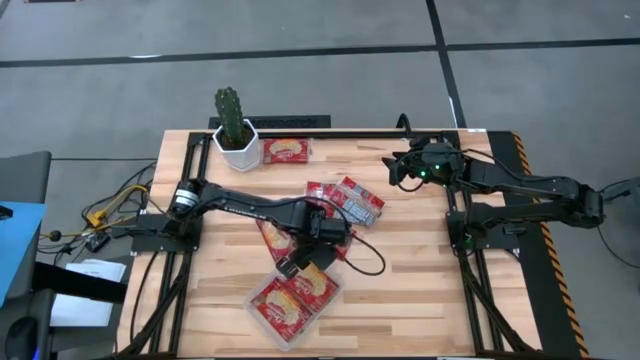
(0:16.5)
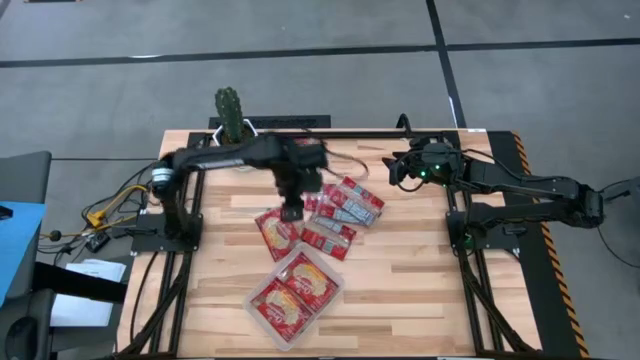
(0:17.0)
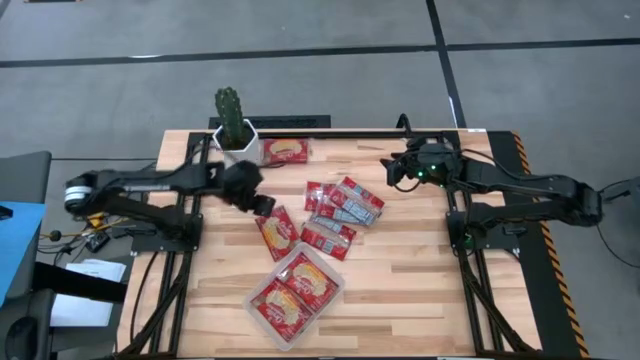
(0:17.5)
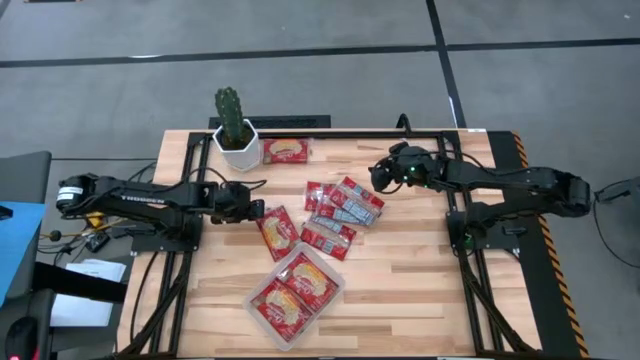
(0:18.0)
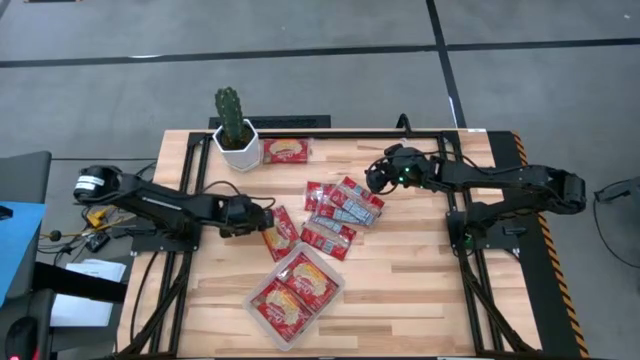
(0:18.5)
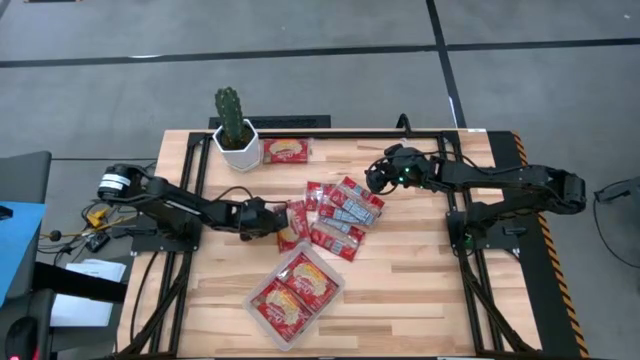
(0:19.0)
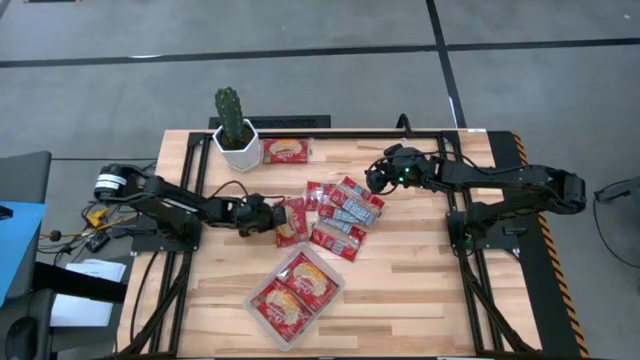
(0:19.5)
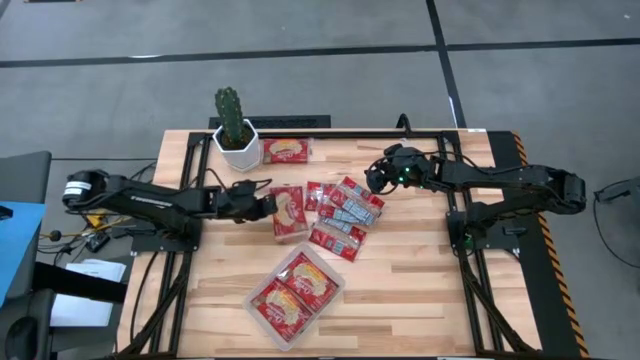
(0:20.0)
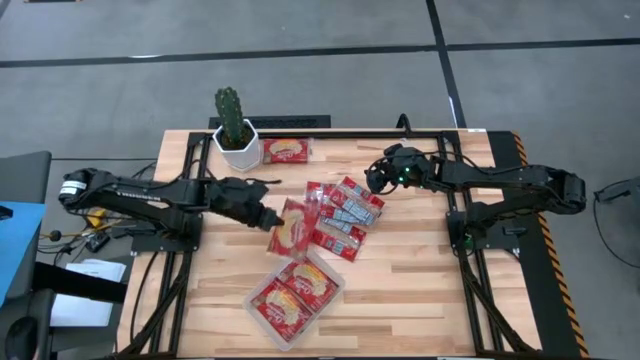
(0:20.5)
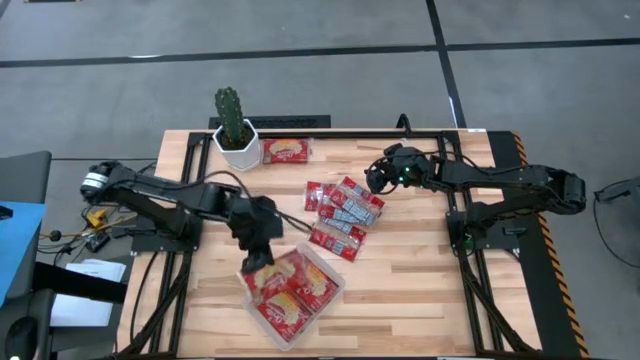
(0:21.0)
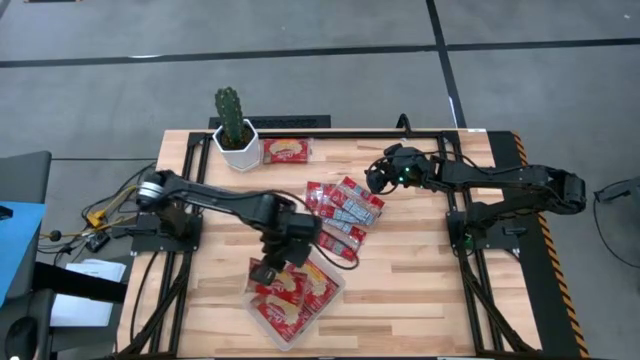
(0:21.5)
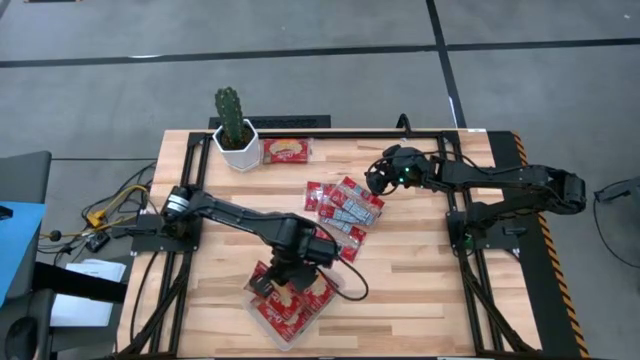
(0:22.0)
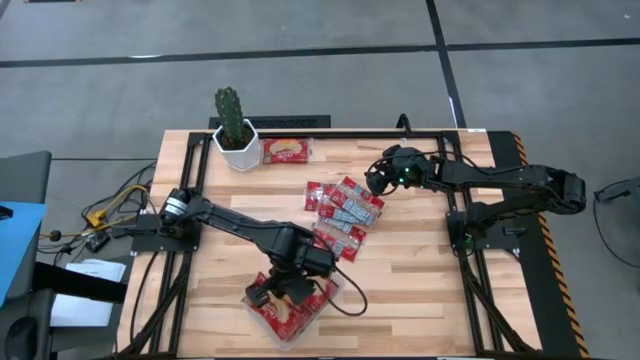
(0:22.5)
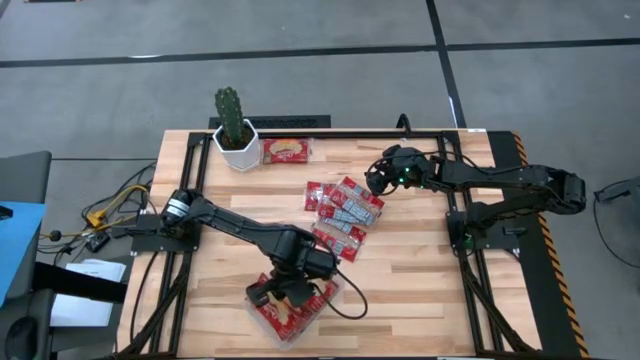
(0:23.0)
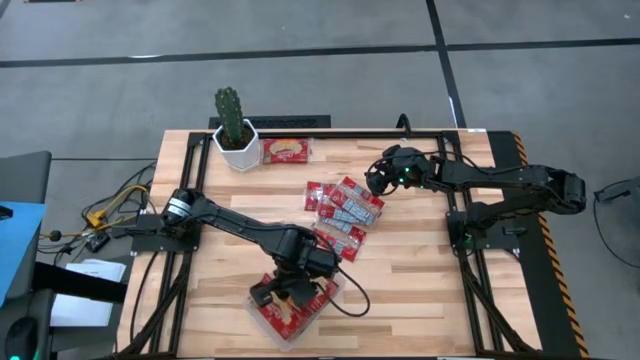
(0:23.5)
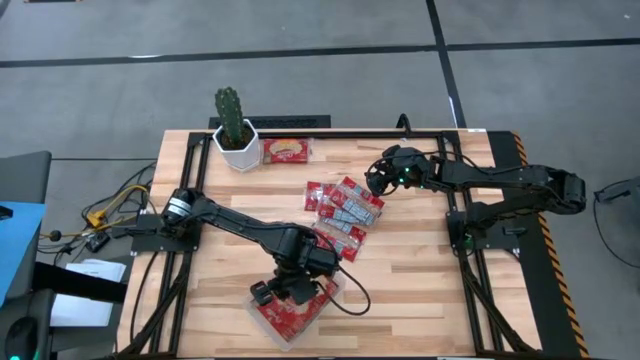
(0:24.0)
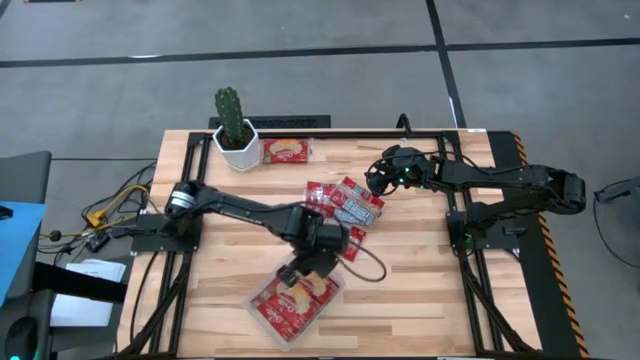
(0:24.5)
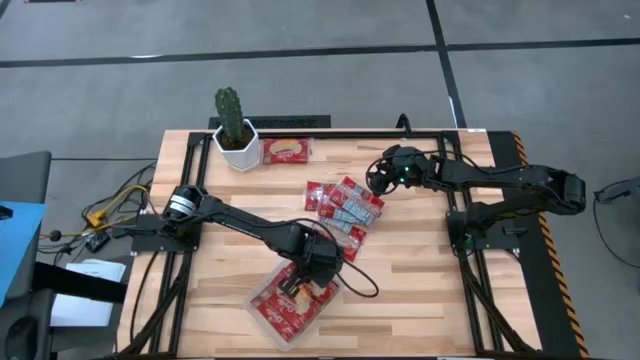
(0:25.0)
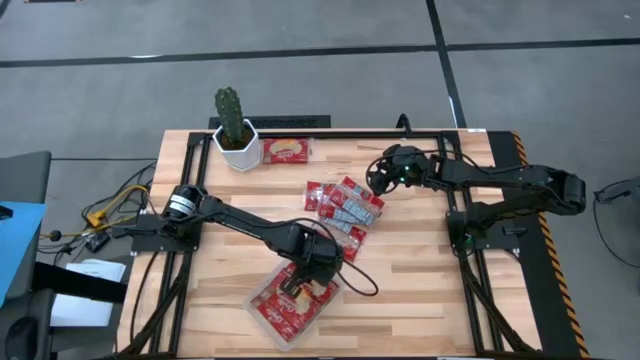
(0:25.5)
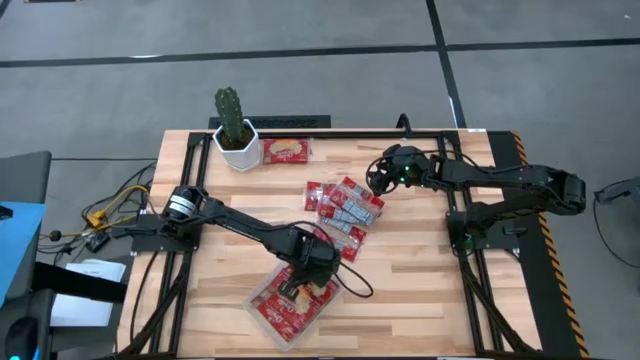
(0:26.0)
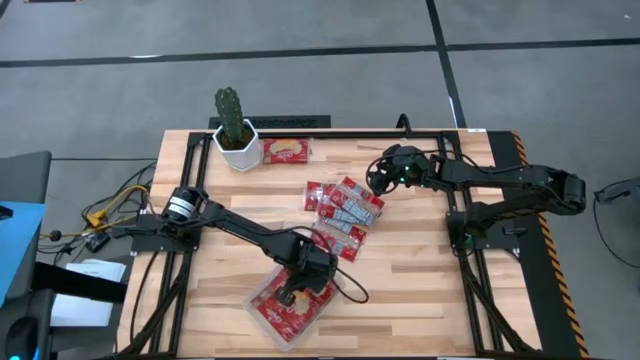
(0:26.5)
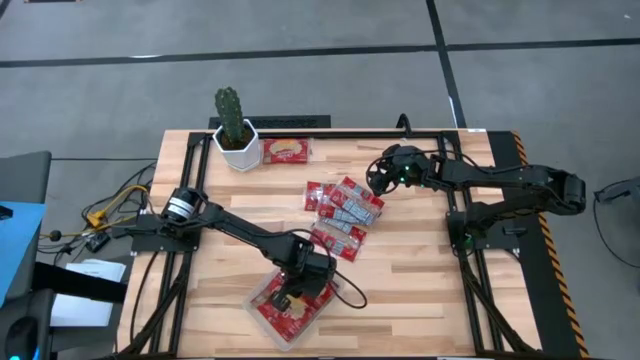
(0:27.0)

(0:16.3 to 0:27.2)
Task: Sort popcorn bags into baskets
Put the red popcorn bag into the transparent bin

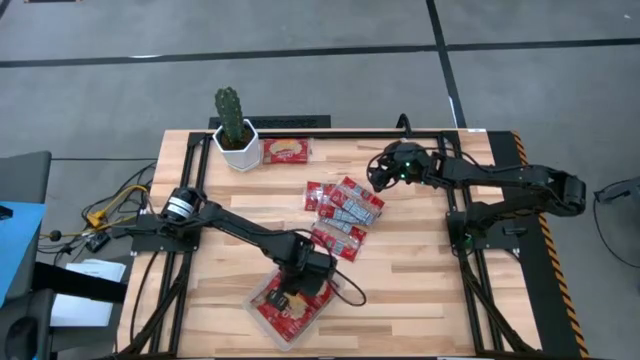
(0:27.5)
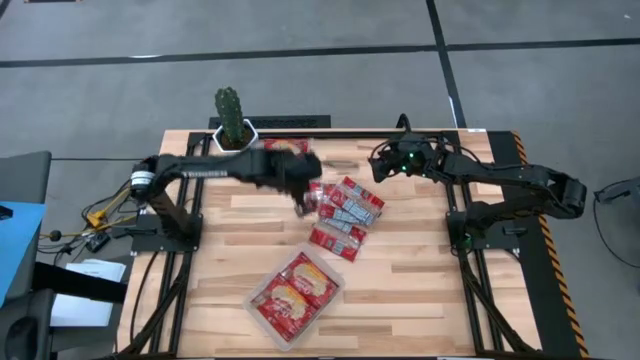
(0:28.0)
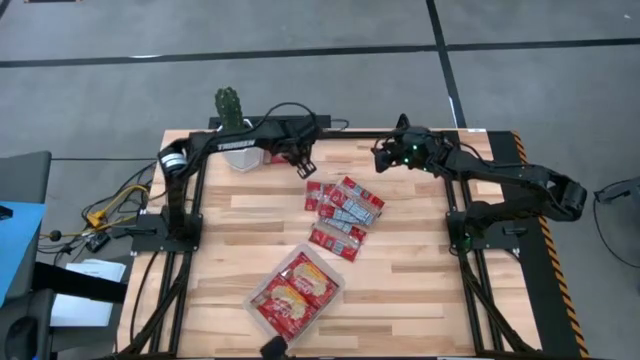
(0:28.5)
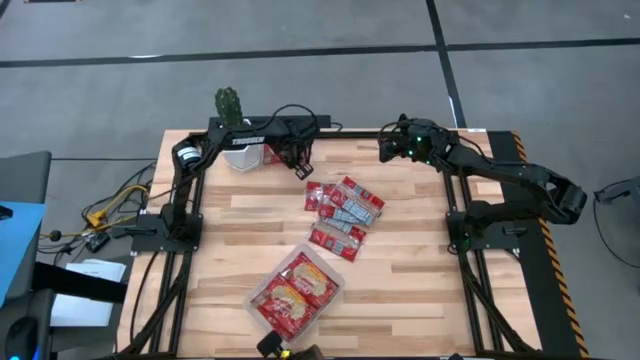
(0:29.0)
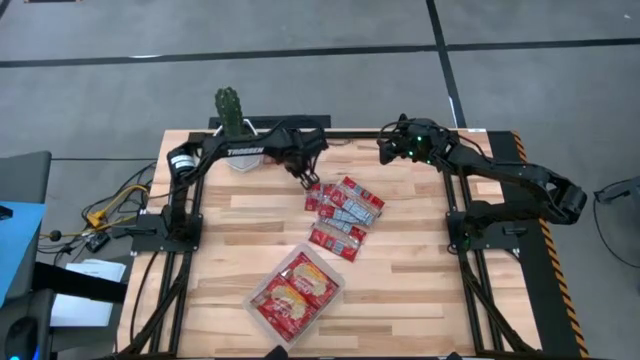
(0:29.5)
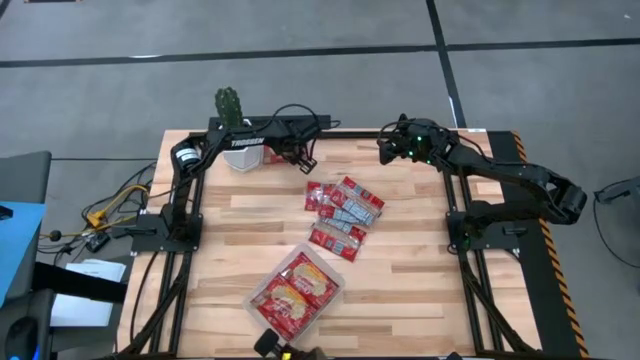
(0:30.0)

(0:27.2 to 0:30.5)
Put the red popcorn bag into the transparent bin

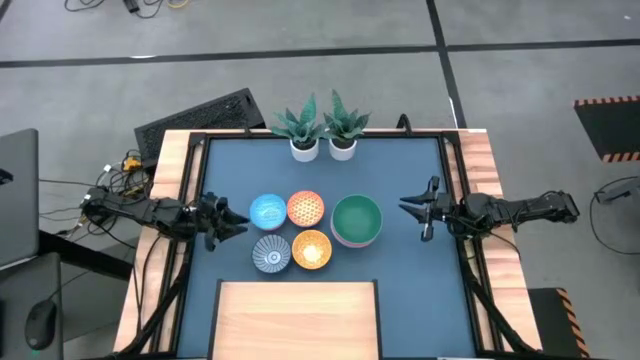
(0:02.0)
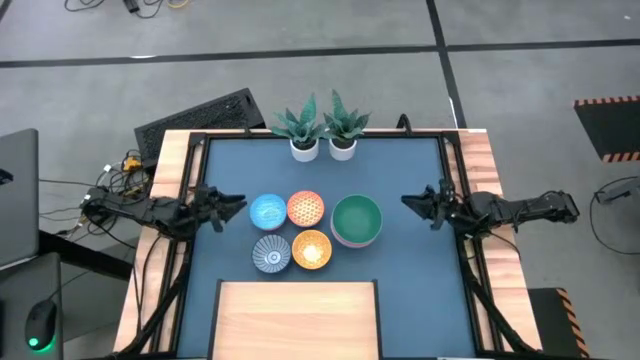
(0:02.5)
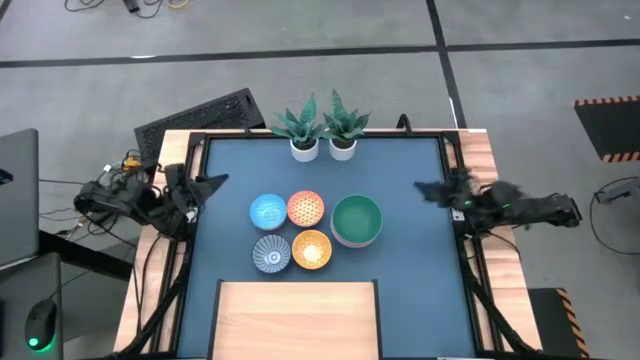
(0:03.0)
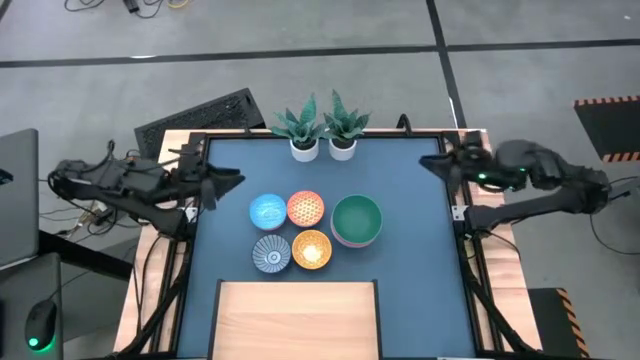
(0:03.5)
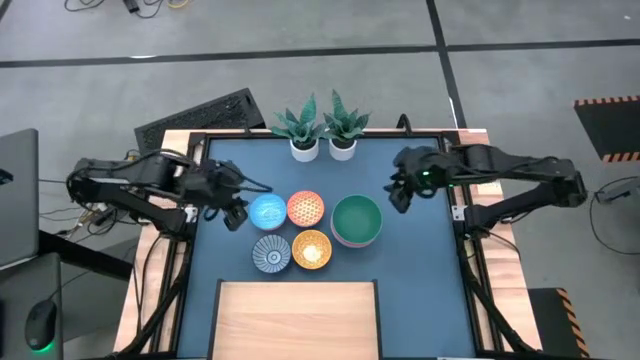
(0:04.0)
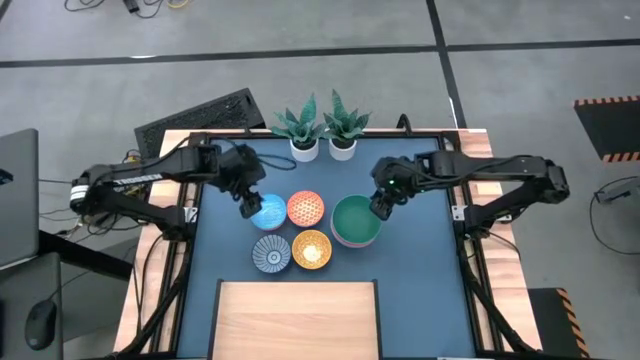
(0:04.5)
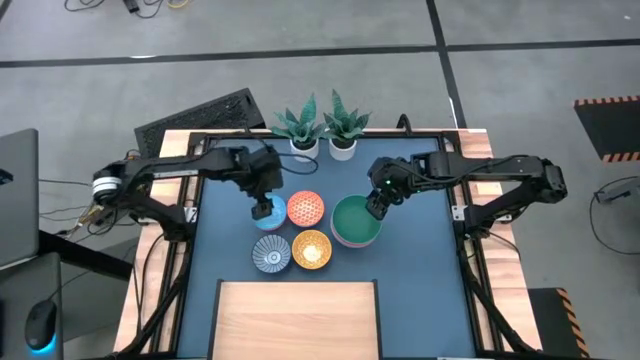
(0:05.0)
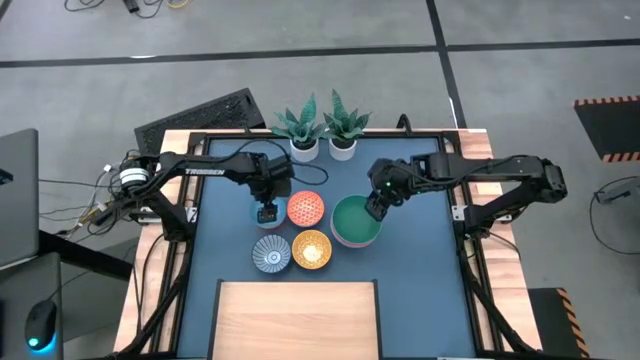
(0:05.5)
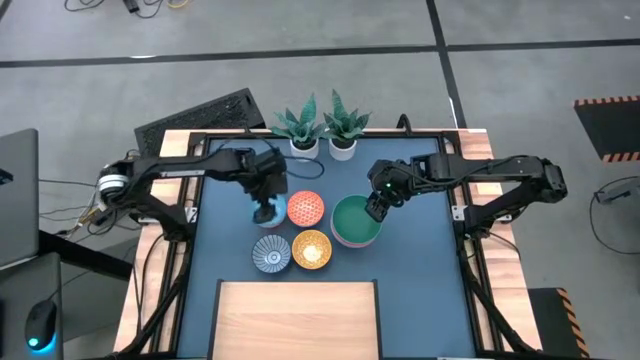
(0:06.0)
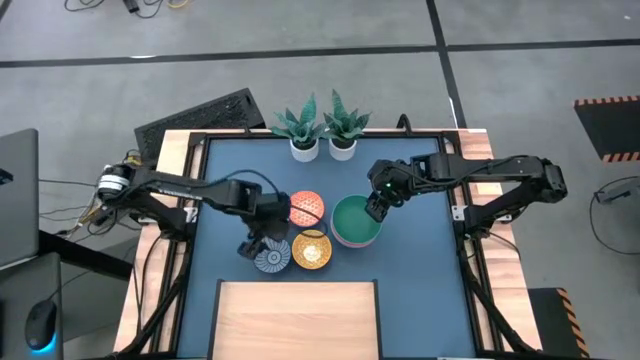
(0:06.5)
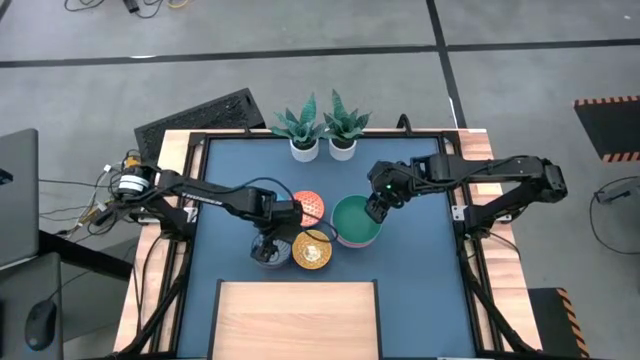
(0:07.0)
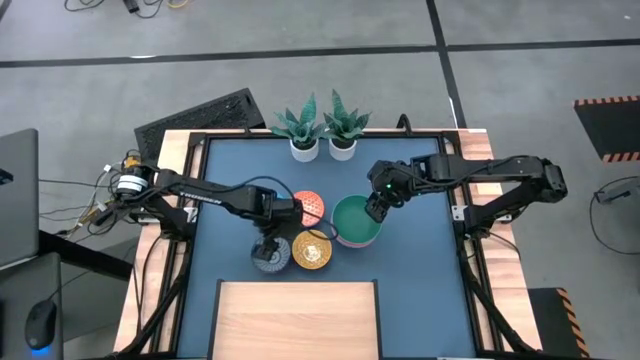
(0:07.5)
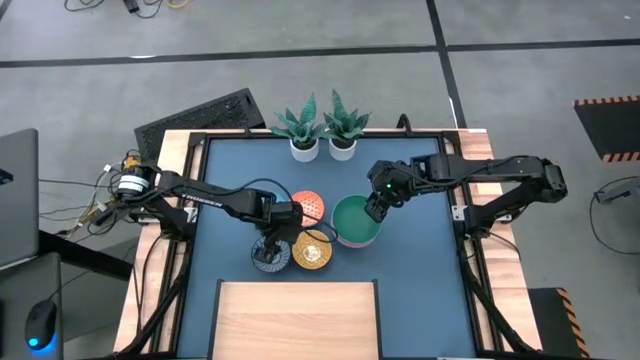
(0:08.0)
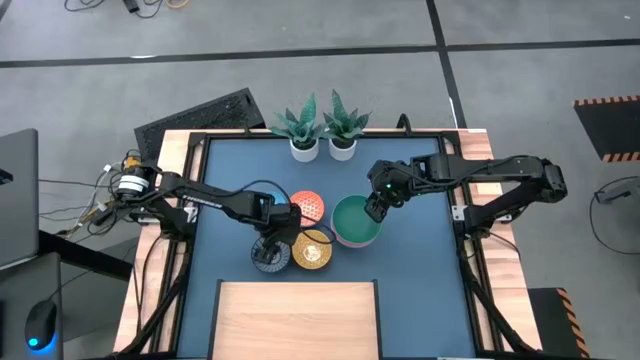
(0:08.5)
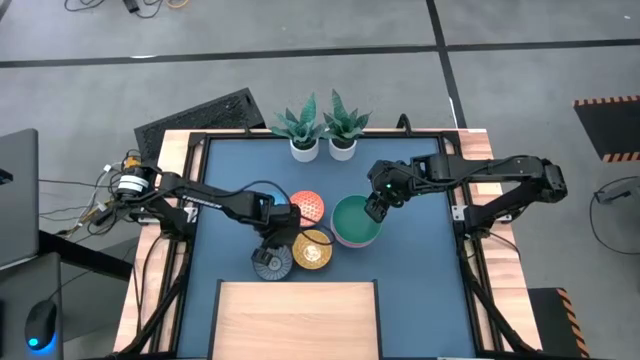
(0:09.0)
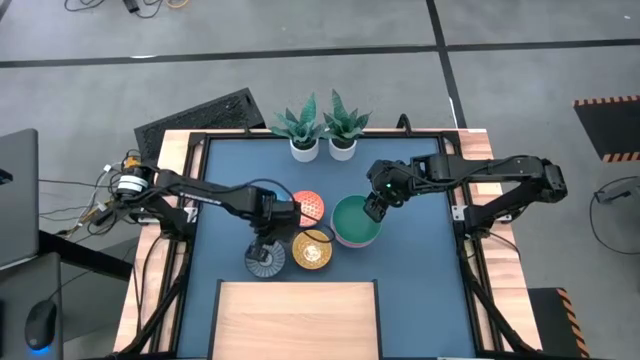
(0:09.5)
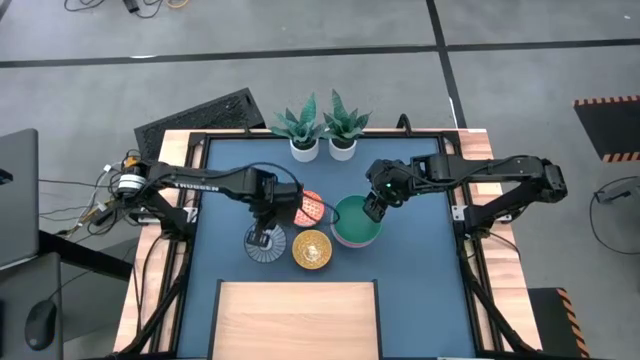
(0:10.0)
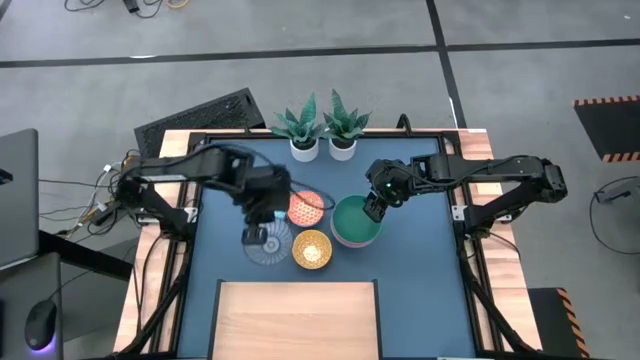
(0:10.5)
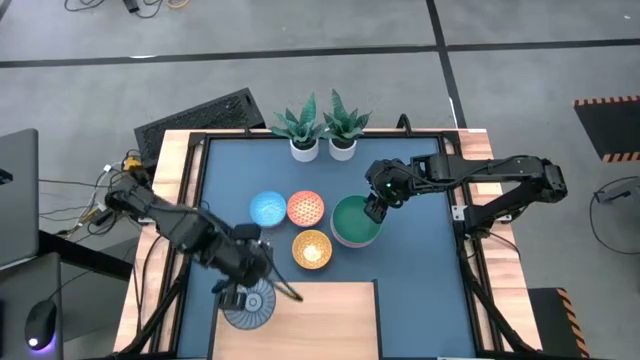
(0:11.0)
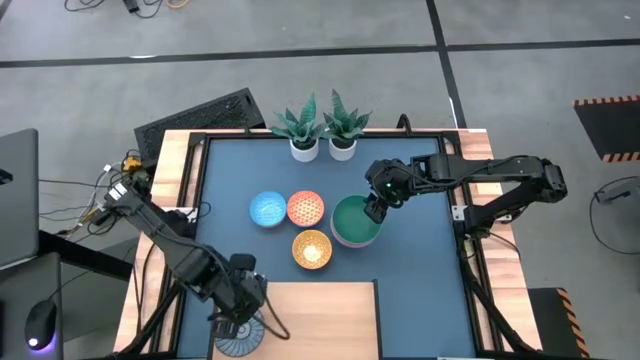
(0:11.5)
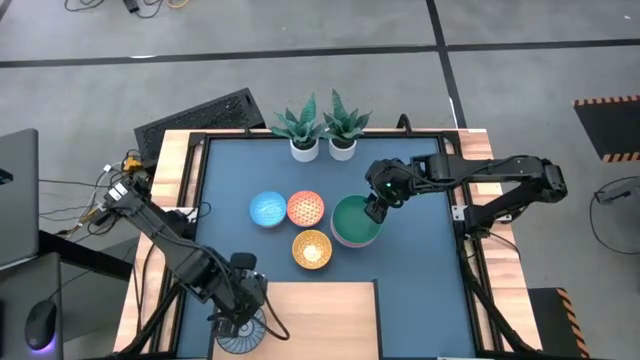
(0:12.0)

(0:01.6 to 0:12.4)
Task: Place and stack bowls onto a shelf
Put the dark blue and white bowl on the shelf
